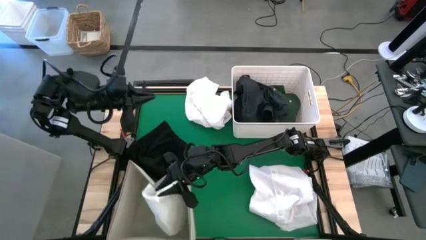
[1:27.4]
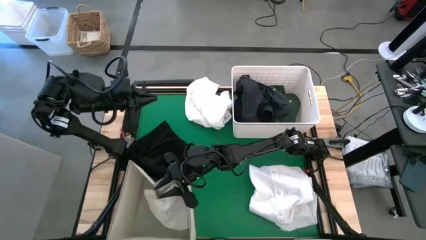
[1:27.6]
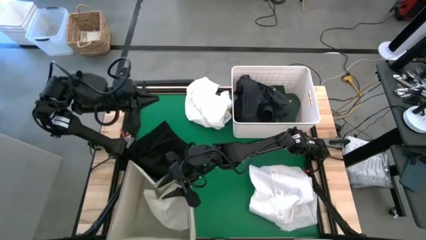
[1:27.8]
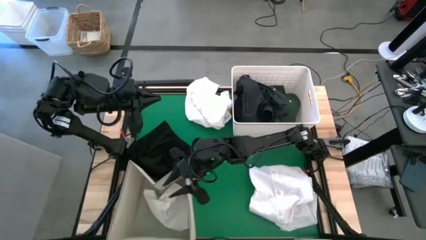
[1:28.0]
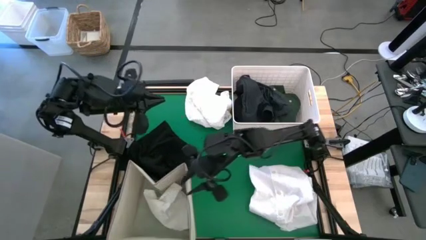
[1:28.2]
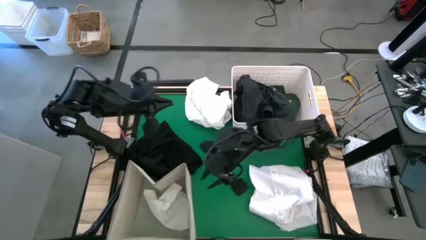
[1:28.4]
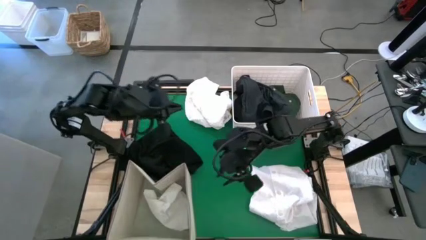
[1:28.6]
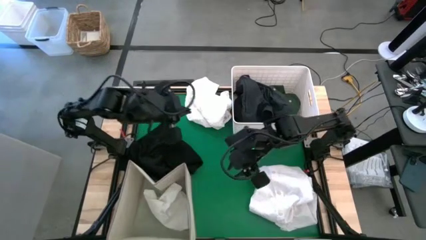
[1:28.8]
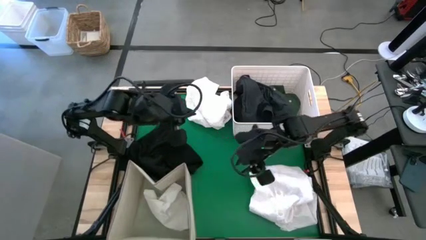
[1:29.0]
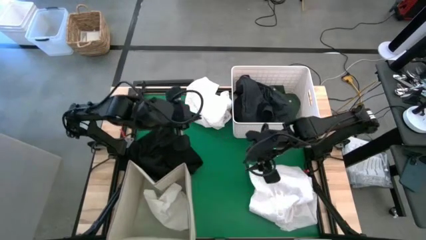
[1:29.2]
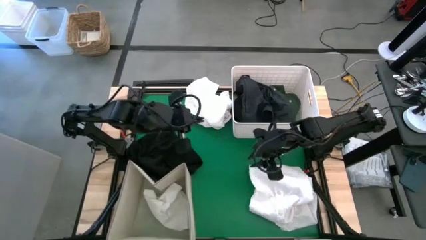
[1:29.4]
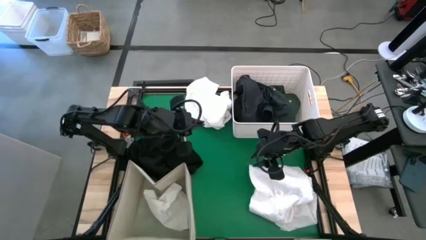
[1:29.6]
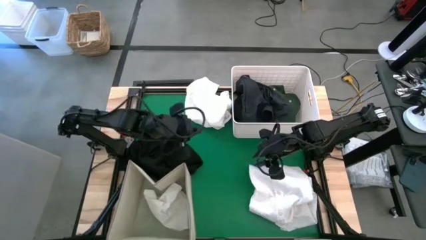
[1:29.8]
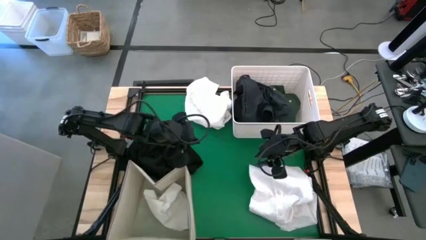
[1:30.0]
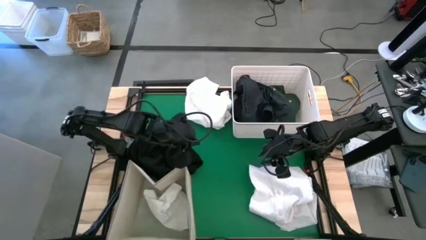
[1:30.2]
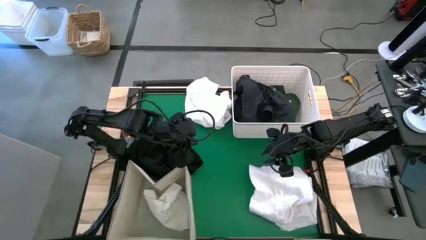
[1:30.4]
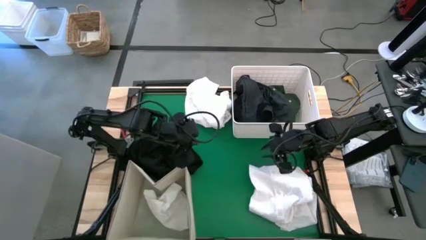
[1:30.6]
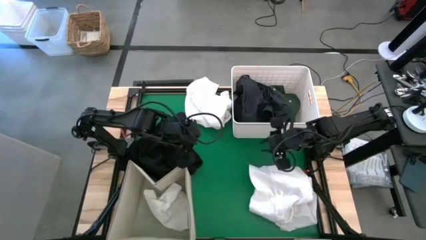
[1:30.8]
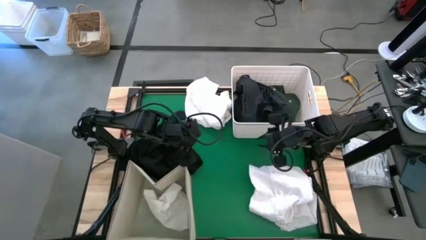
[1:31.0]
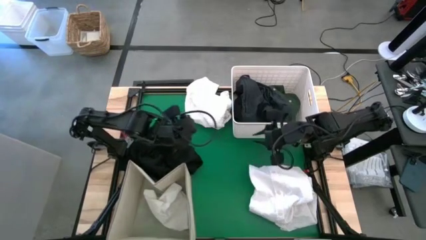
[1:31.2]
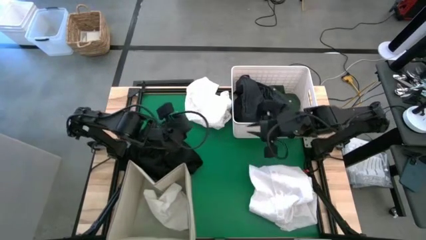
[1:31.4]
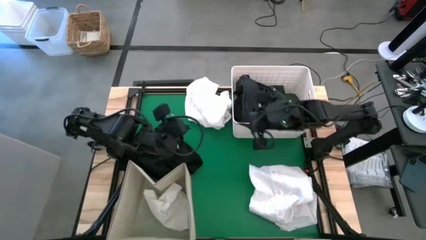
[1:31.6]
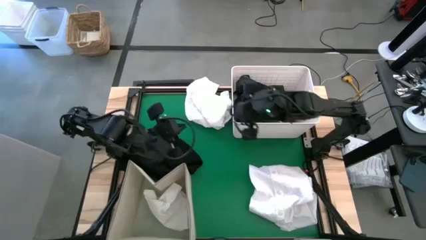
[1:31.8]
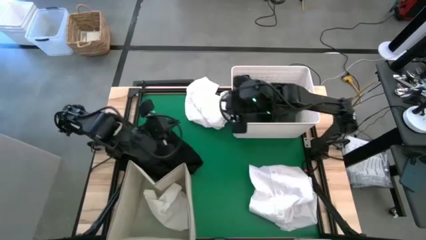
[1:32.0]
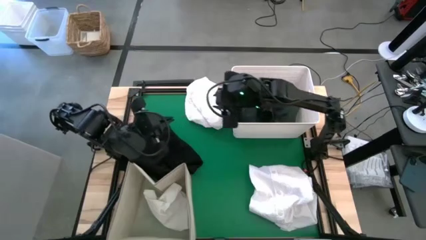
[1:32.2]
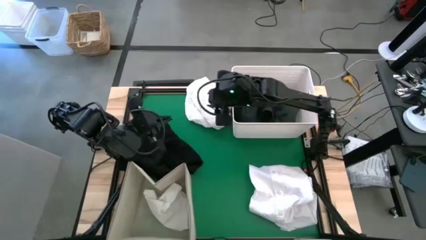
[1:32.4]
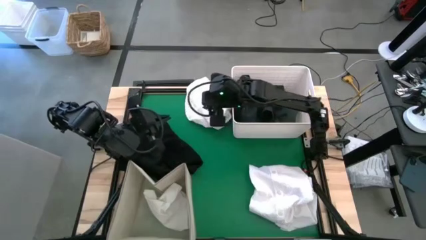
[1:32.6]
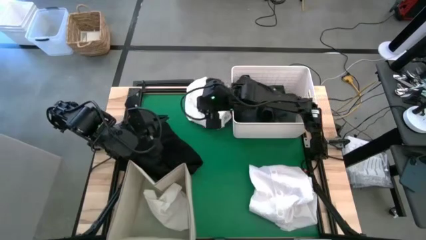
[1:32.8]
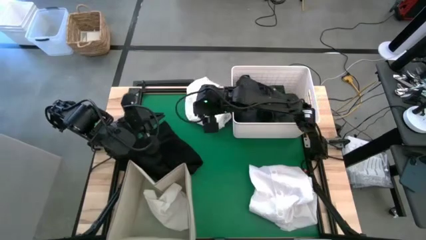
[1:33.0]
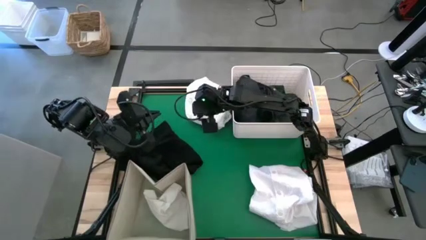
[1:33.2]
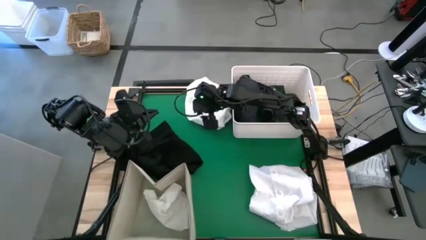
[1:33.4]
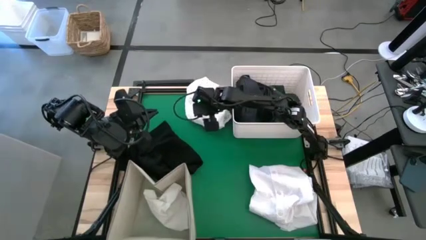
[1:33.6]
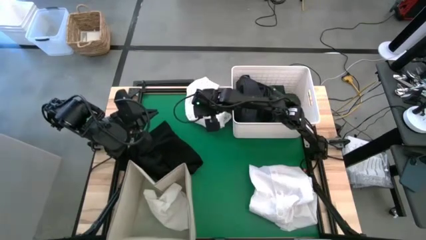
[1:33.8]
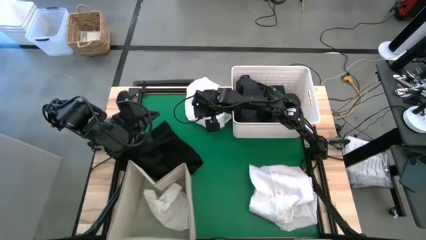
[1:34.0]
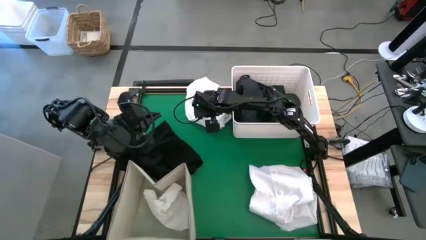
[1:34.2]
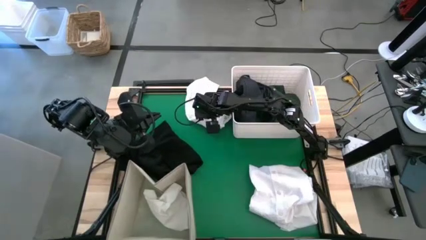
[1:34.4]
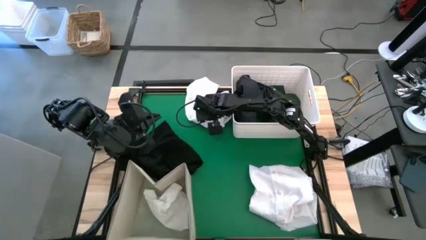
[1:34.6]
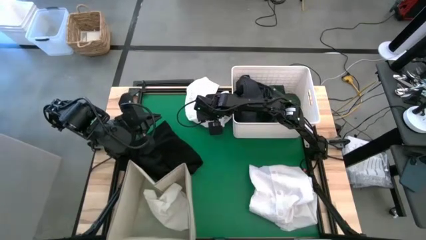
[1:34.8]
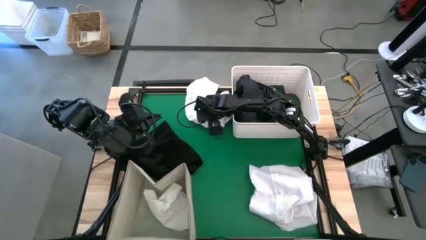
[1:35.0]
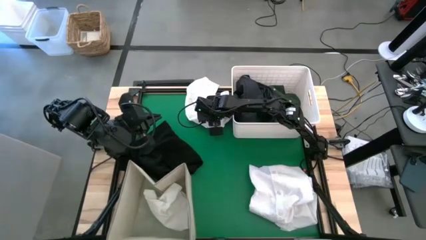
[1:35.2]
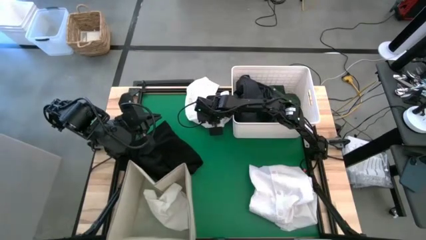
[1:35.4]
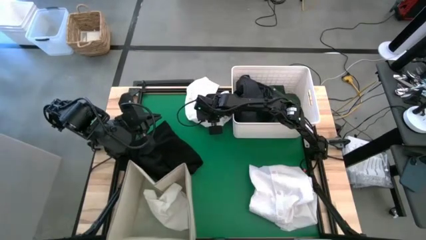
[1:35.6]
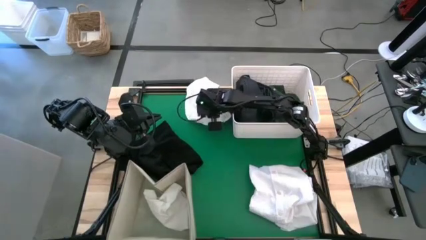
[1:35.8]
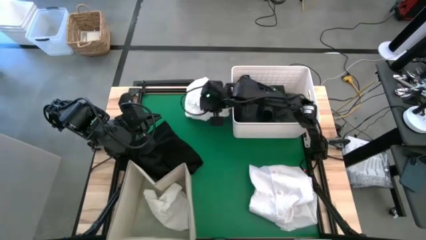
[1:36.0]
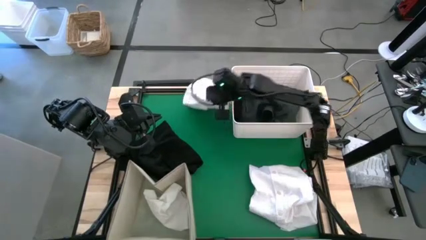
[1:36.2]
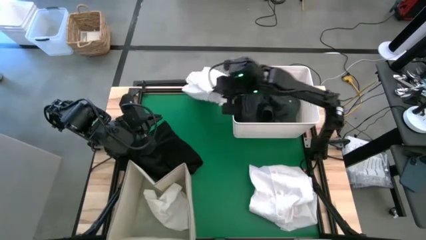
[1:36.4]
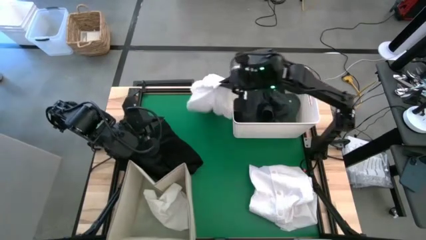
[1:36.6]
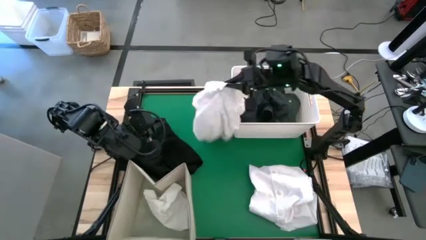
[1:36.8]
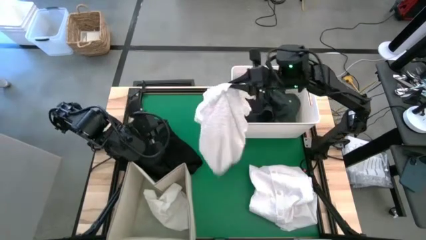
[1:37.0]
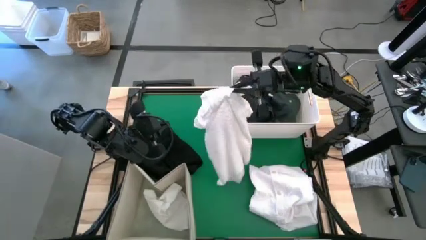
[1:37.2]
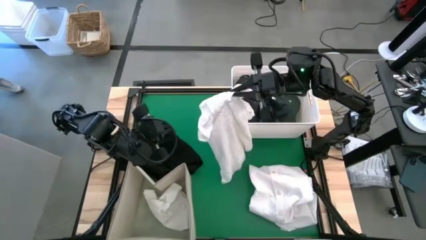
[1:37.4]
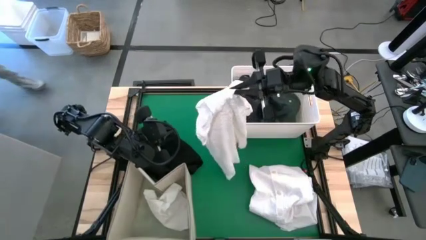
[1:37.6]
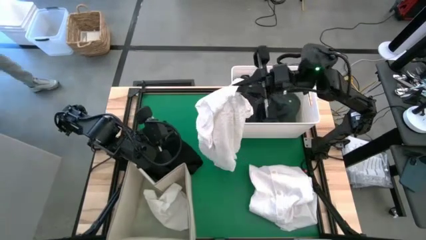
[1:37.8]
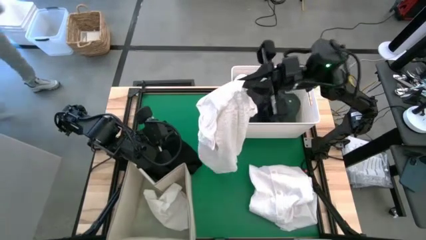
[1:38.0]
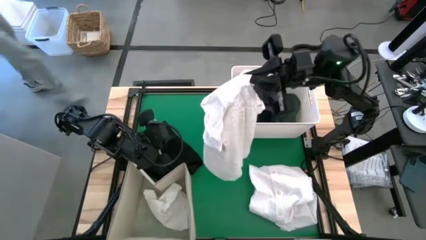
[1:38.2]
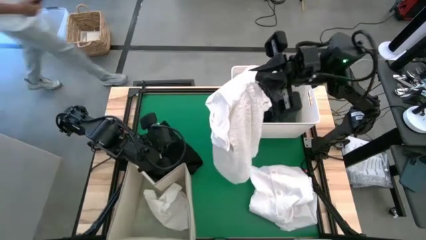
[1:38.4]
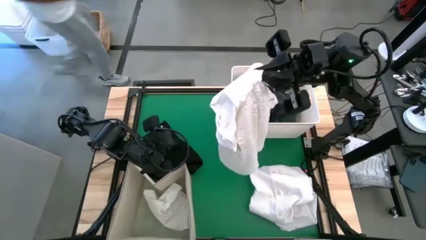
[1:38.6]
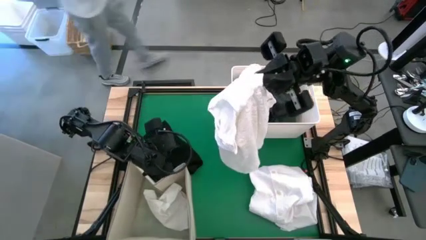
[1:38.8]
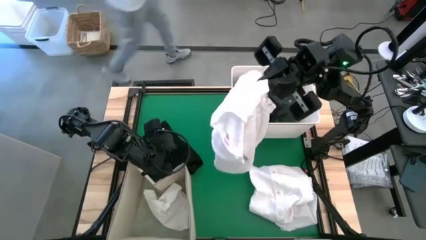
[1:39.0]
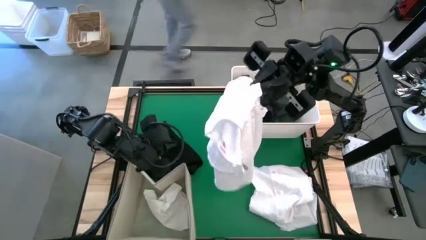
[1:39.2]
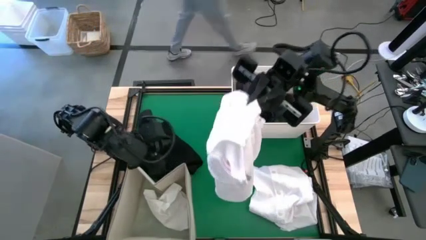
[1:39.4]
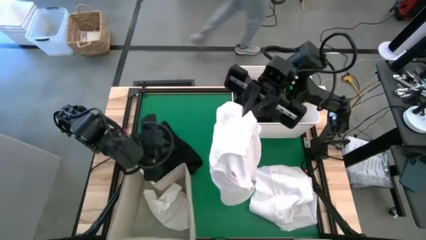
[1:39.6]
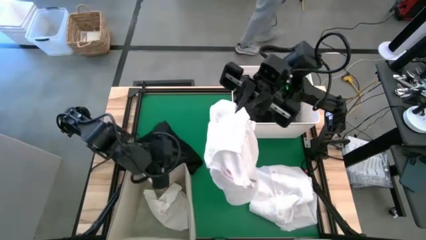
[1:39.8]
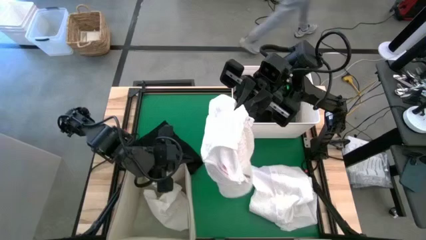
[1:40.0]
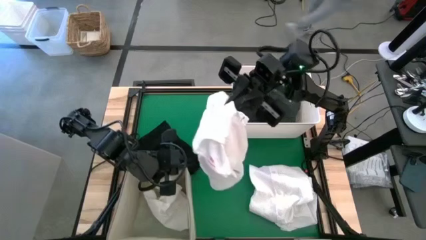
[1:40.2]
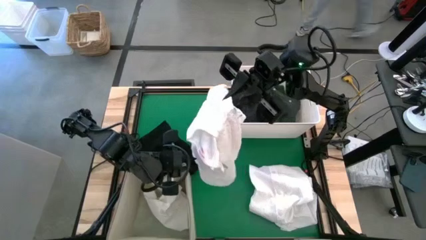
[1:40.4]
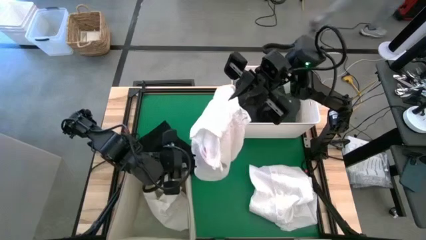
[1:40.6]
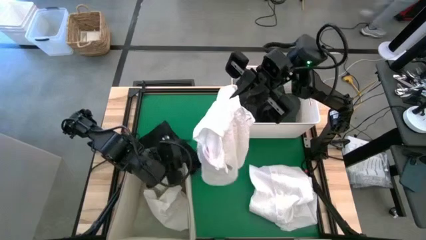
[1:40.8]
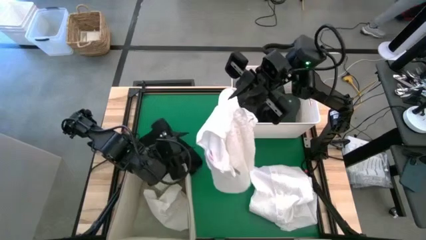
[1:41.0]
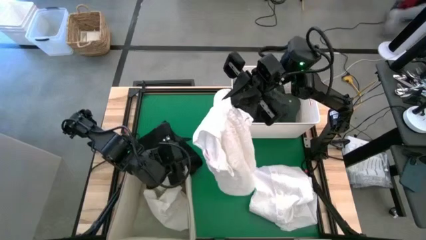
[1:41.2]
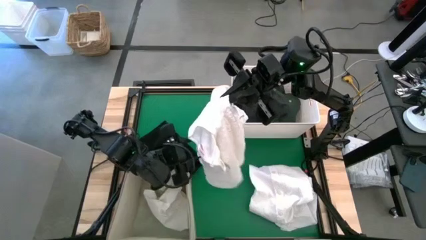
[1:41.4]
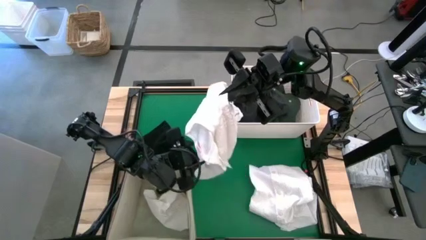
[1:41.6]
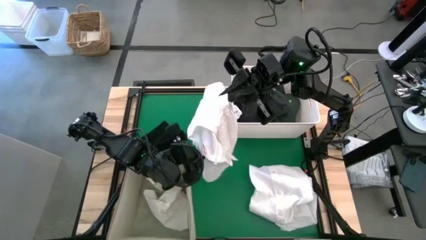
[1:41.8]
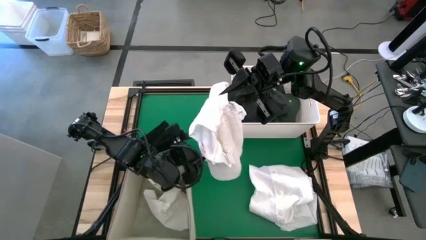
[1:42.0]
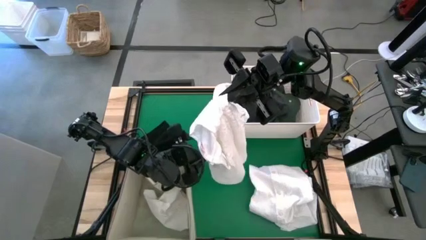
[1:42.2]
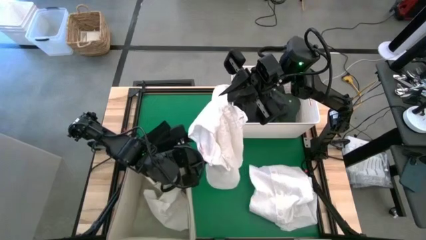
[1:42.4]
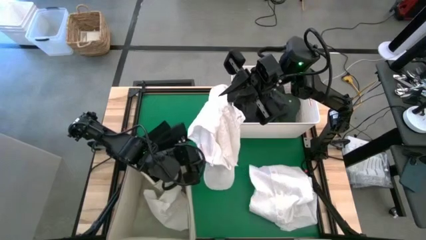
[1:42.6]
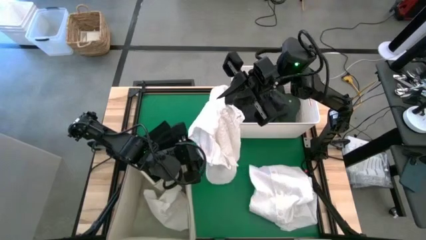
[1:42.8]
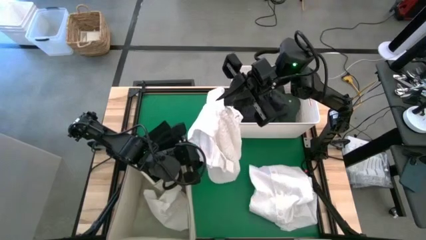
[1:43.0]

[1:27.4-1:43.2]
Task: Sort clothes
Put the white dress into the bottom left white bin

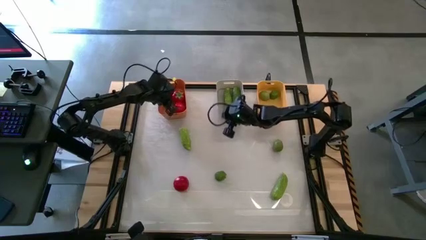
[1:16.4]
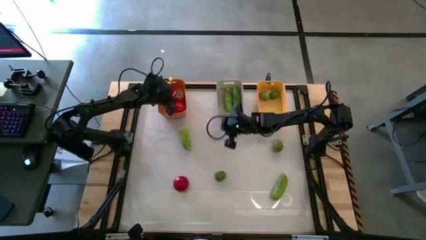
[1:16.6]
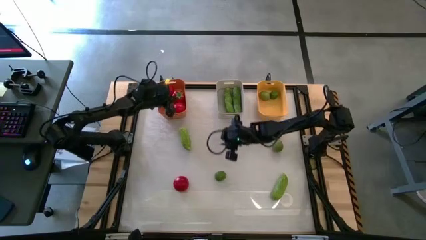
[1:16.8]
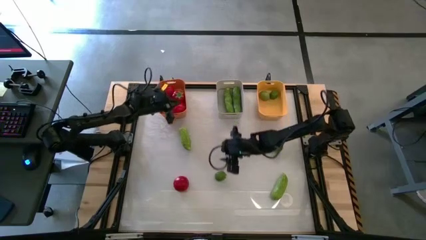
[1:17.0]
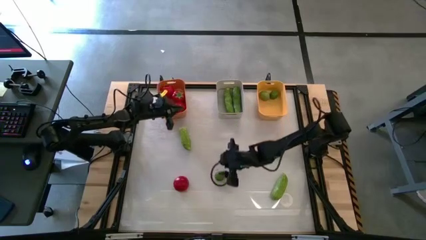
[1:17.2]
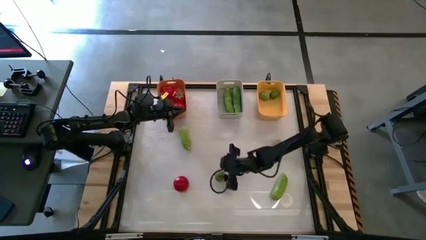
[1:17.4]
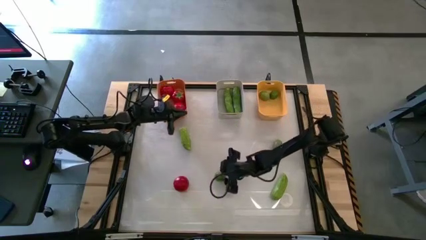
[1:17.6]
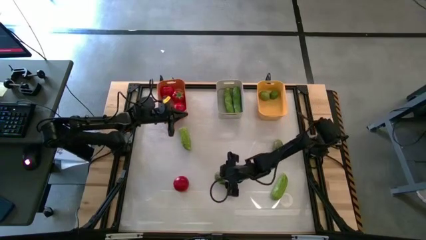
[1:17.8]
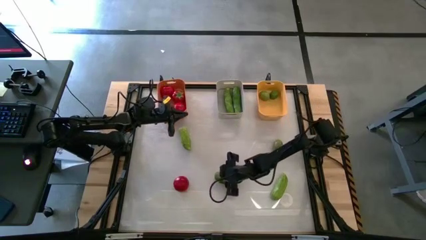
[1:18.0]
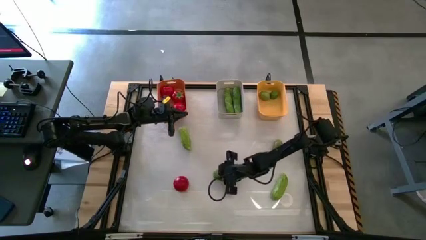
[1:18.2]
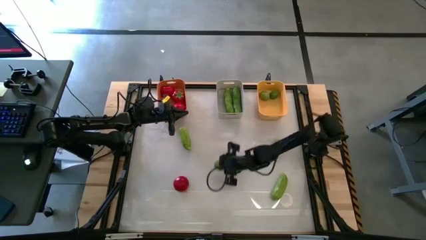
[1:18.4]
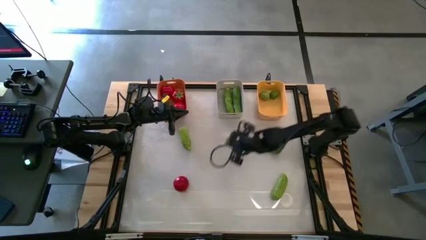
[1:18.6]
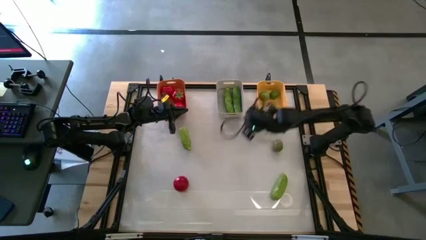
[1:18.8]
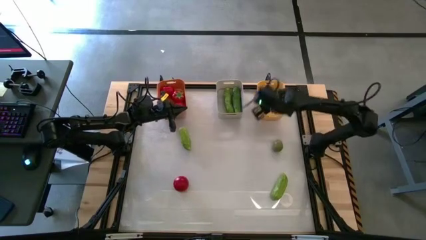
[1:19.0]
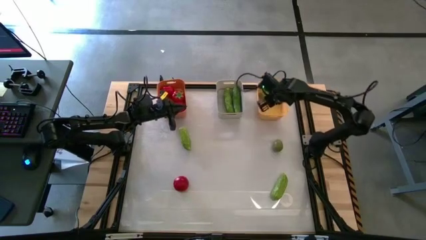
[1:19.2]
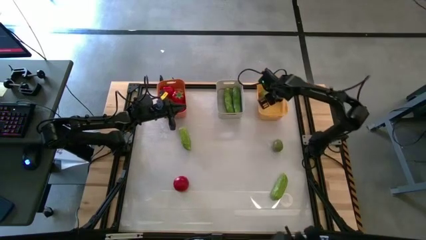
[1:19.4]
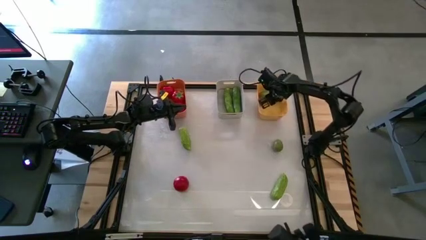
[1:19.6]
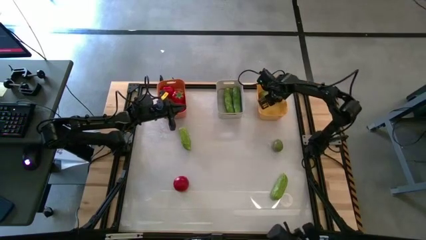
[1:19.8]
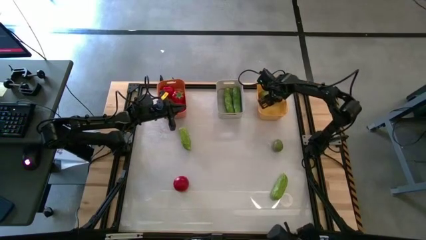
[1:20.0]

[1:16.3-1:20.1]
Task: Sort produce into baskets
Put the bottom lime into the yellow bin
